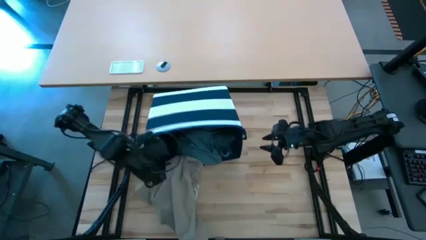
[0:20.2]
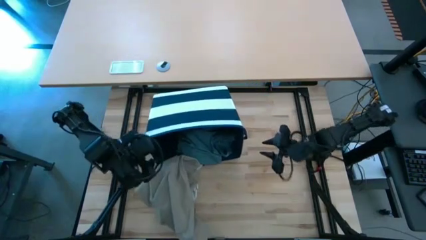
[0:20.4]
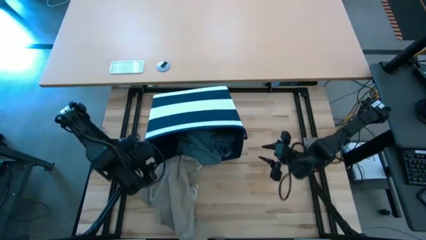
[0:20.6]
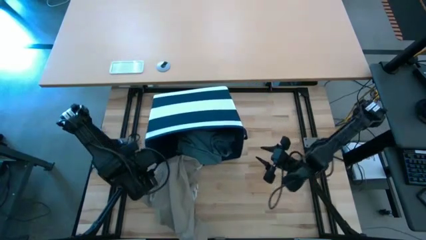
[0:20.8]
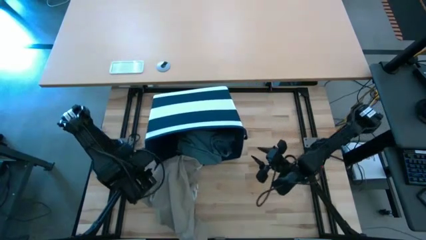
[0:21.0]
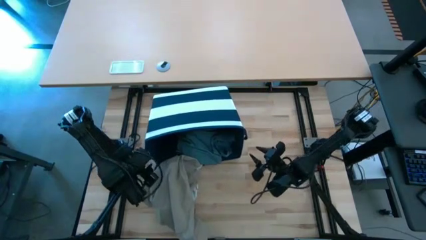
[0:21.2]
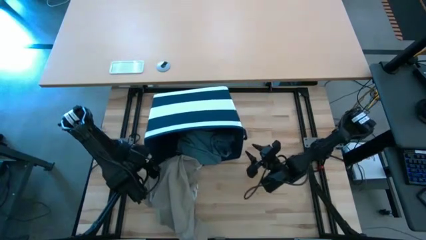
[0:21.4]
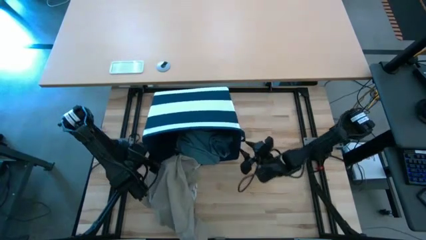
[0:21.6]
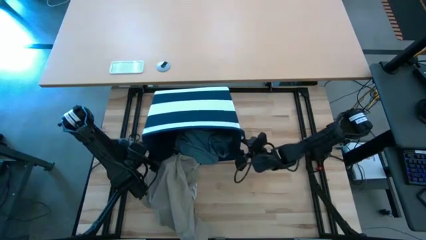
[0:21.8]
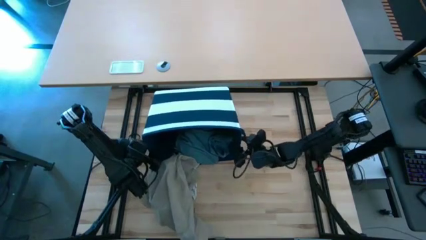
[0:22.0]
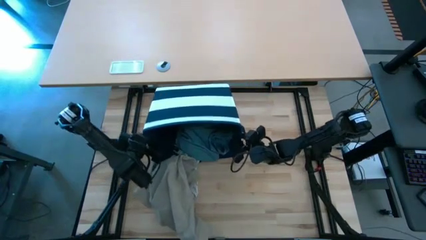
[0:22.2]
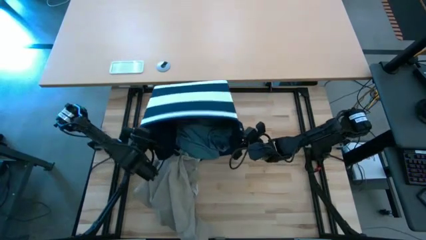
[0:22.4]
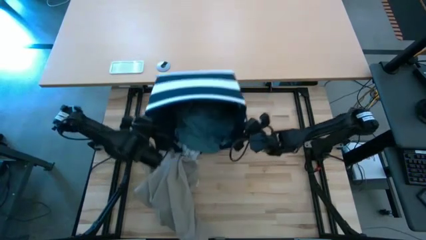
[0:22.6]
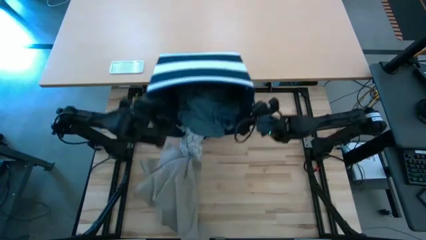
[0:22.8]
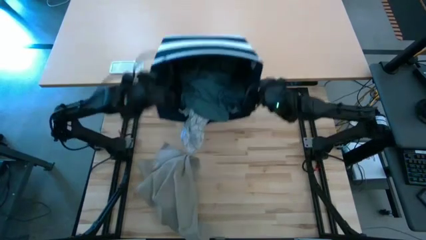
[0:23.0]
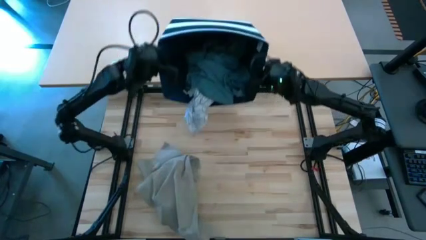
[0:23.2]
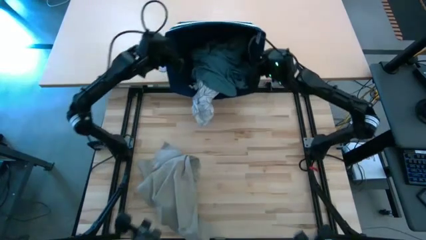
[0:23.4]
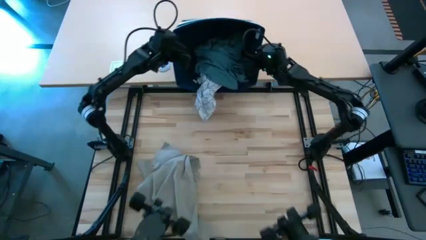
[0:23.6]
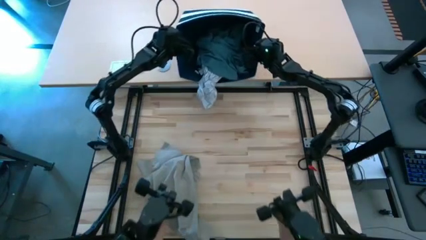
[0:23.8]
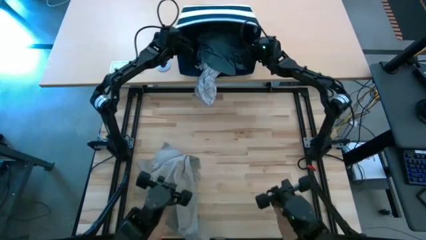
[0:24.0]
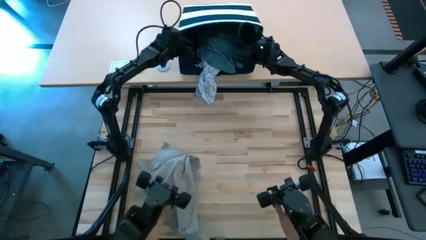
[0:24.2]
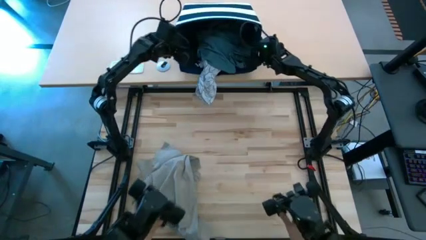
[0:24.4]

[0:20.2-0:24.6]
Task: Fold Laundry from Bin
Adjust the blue laundry basket

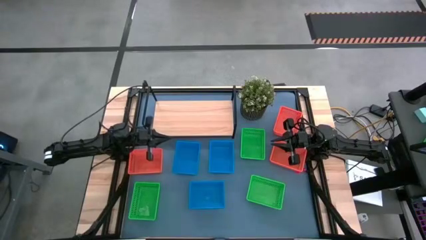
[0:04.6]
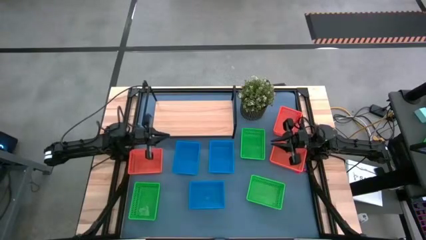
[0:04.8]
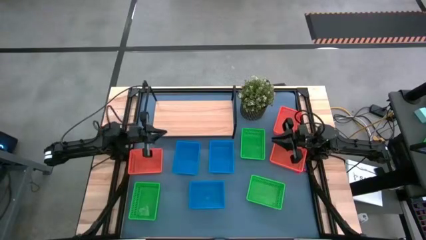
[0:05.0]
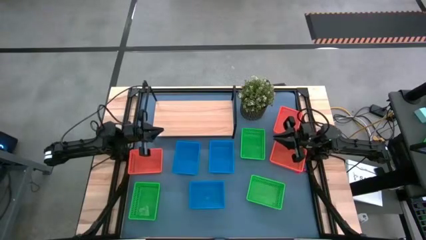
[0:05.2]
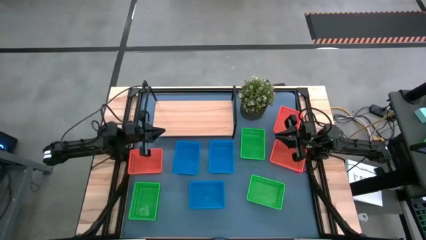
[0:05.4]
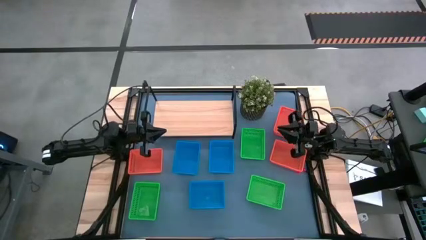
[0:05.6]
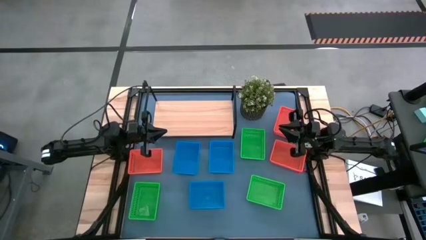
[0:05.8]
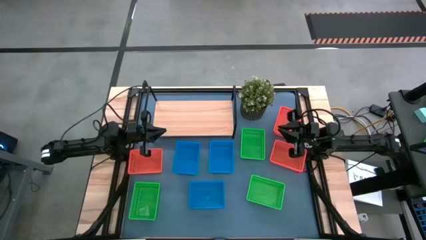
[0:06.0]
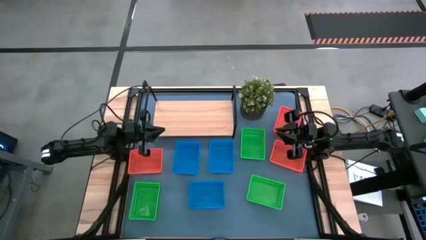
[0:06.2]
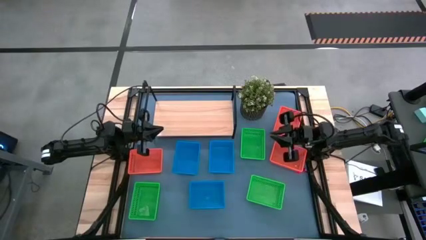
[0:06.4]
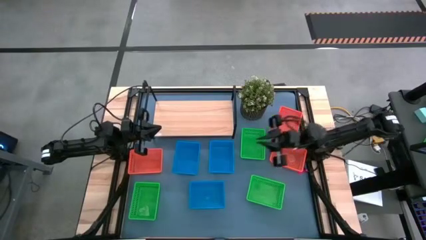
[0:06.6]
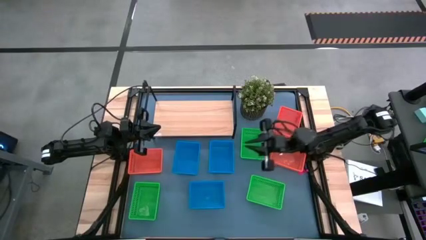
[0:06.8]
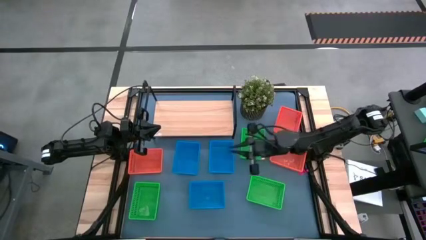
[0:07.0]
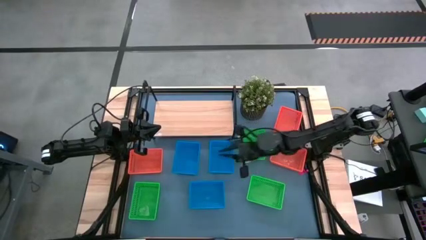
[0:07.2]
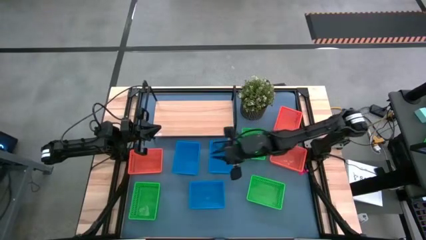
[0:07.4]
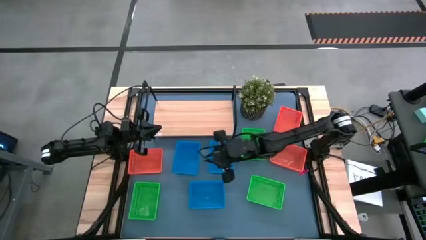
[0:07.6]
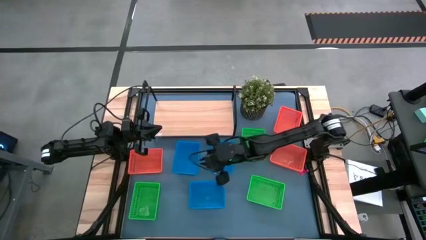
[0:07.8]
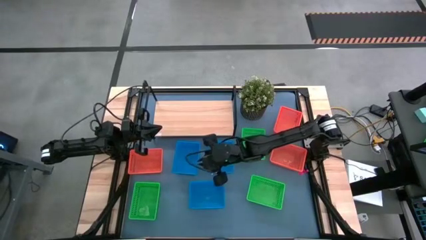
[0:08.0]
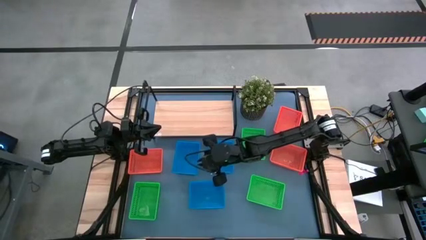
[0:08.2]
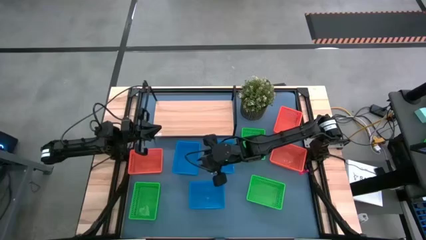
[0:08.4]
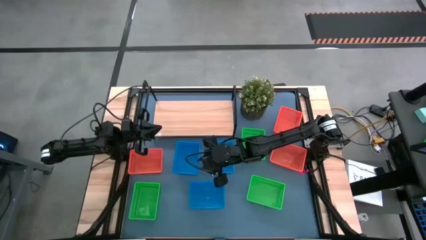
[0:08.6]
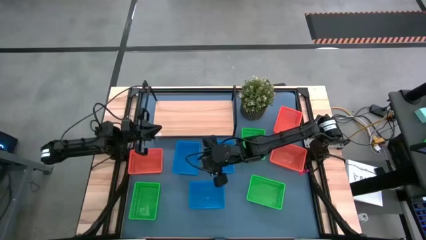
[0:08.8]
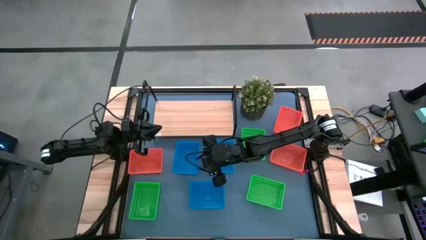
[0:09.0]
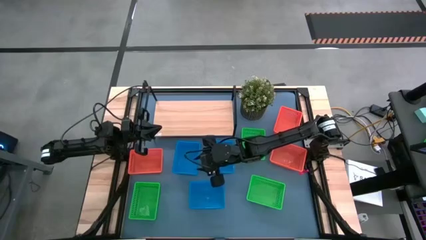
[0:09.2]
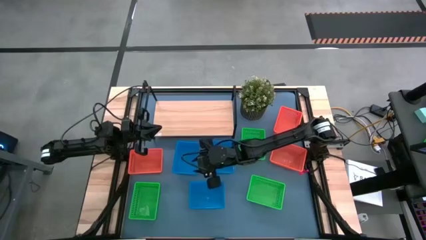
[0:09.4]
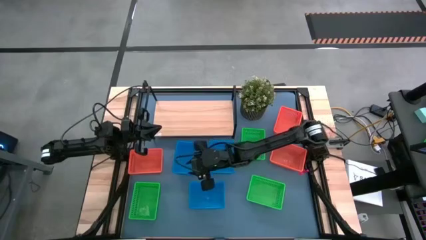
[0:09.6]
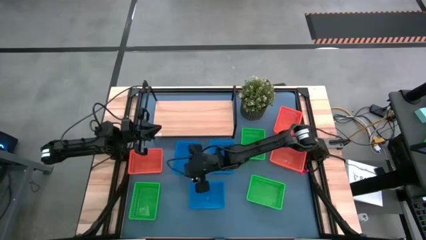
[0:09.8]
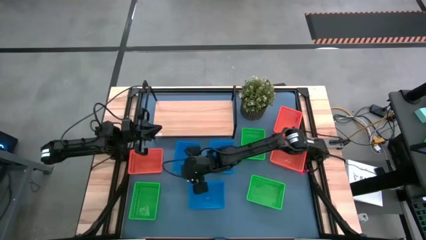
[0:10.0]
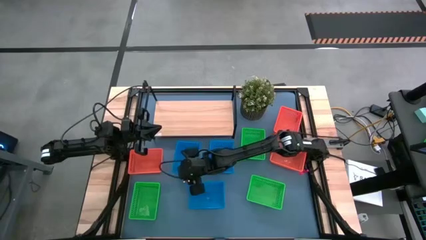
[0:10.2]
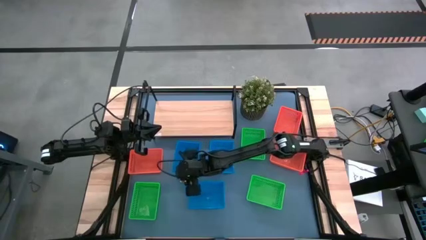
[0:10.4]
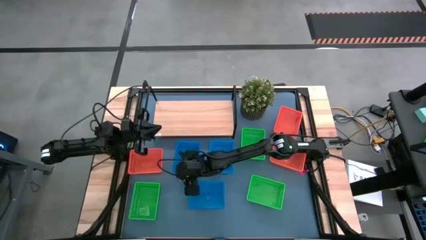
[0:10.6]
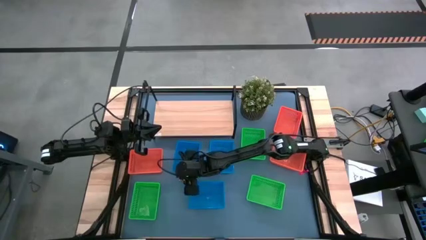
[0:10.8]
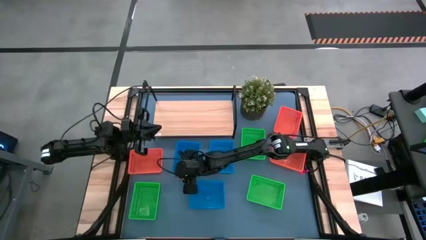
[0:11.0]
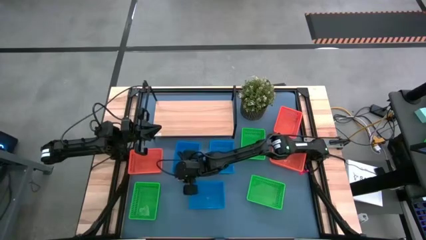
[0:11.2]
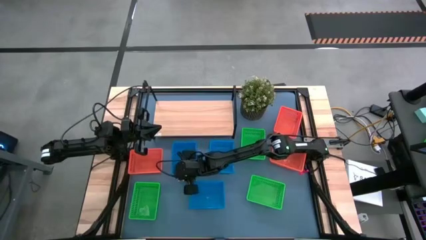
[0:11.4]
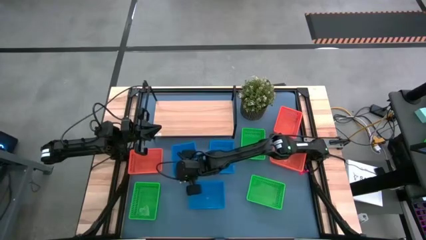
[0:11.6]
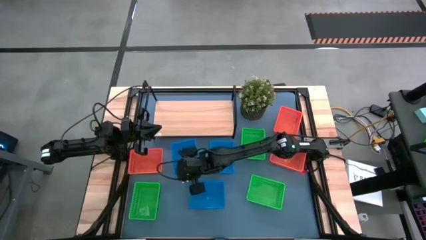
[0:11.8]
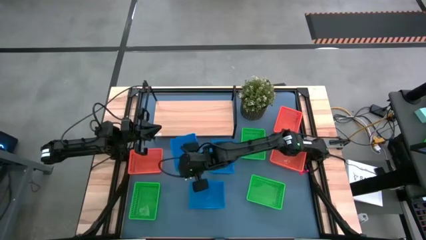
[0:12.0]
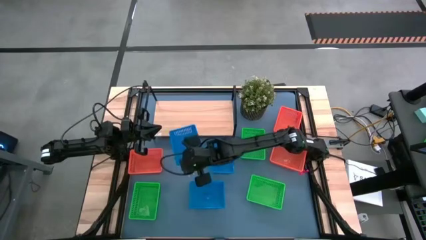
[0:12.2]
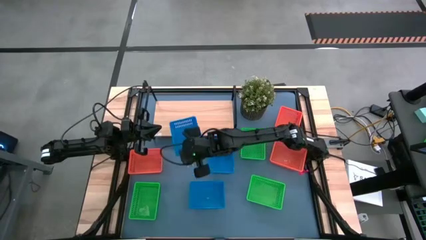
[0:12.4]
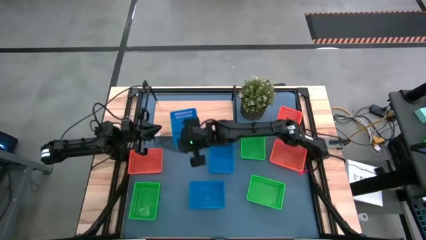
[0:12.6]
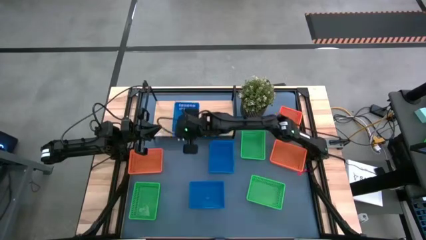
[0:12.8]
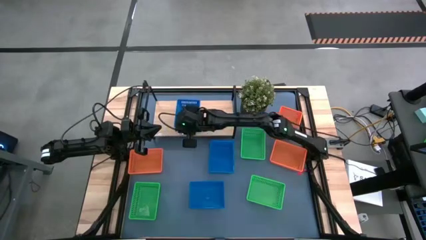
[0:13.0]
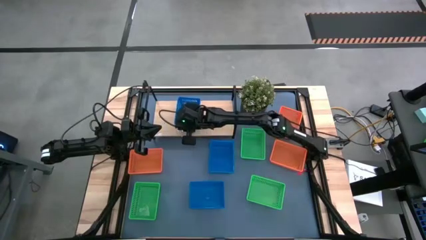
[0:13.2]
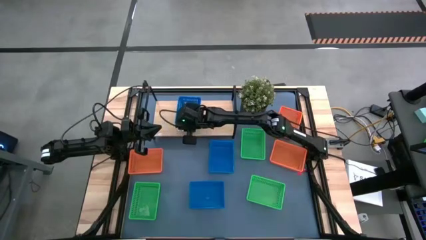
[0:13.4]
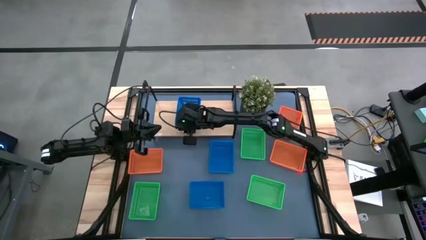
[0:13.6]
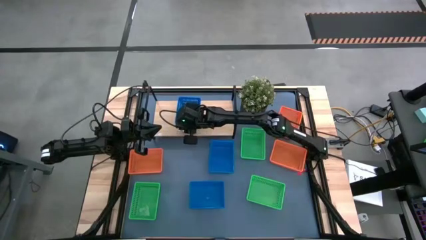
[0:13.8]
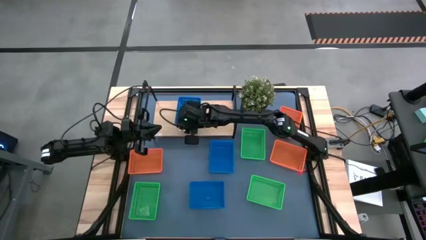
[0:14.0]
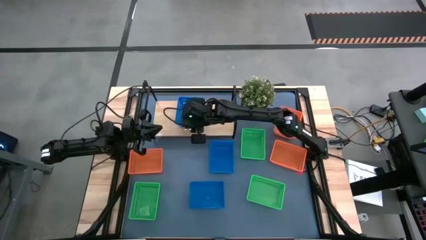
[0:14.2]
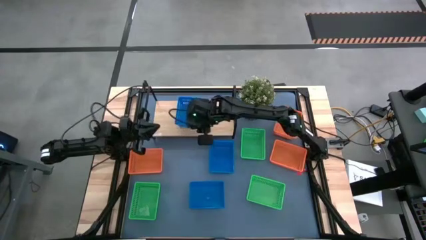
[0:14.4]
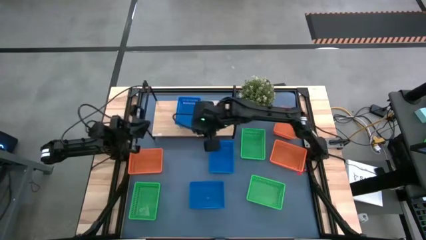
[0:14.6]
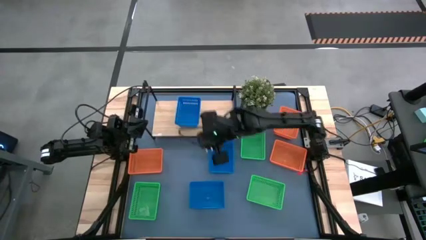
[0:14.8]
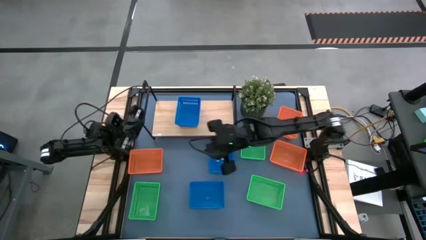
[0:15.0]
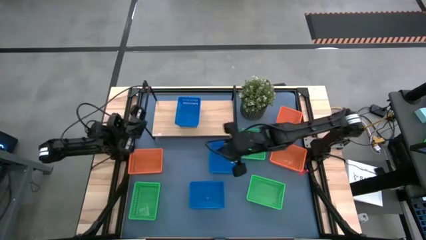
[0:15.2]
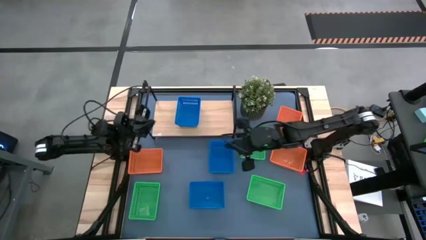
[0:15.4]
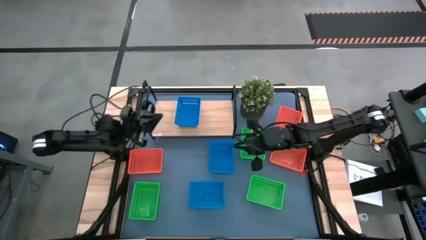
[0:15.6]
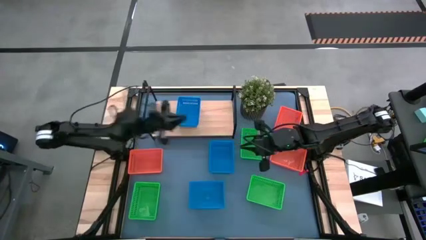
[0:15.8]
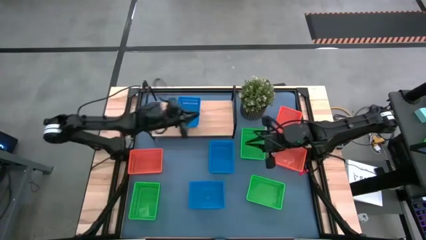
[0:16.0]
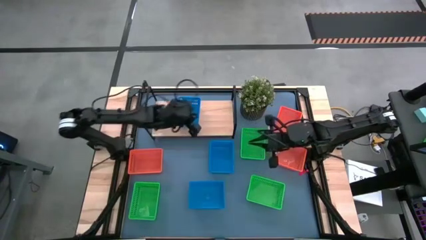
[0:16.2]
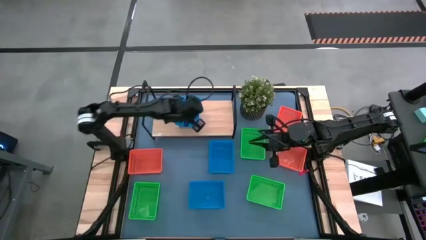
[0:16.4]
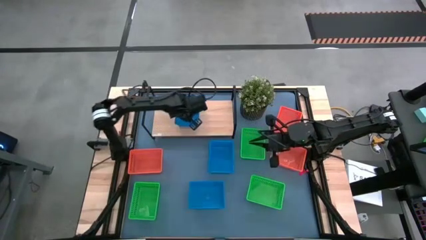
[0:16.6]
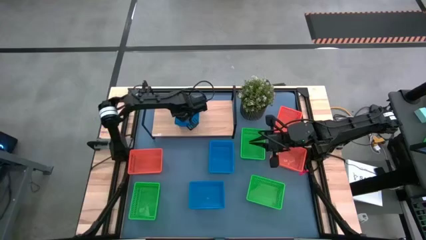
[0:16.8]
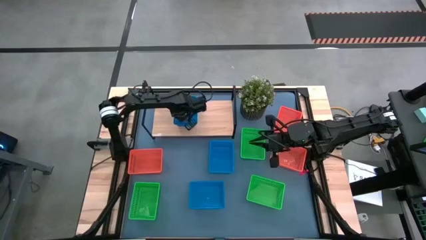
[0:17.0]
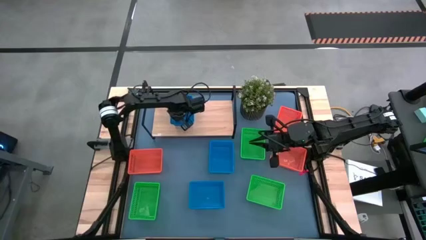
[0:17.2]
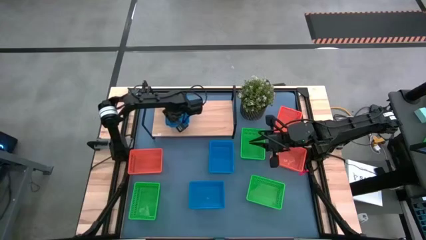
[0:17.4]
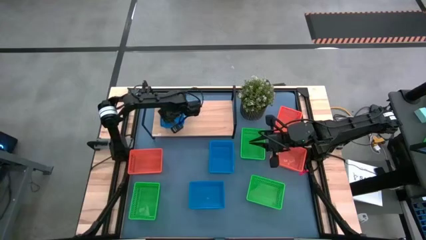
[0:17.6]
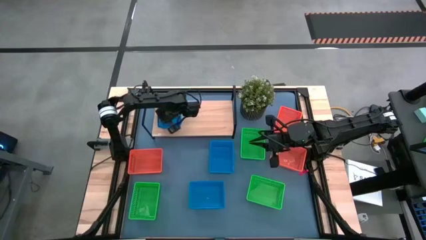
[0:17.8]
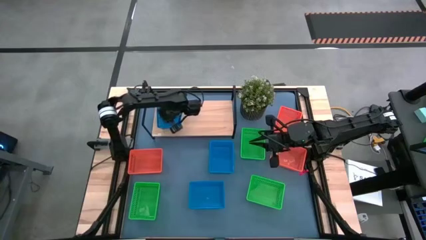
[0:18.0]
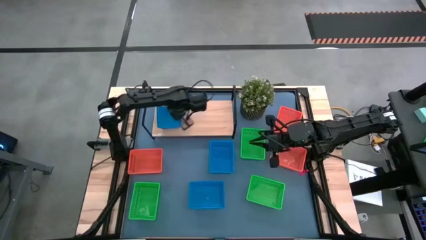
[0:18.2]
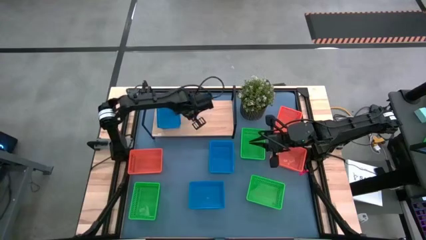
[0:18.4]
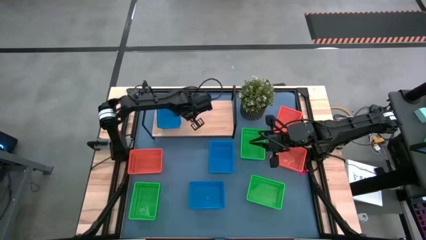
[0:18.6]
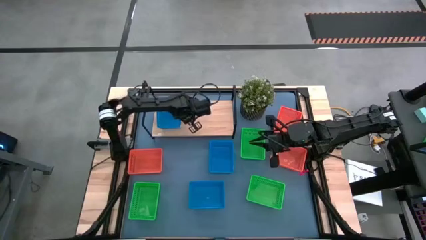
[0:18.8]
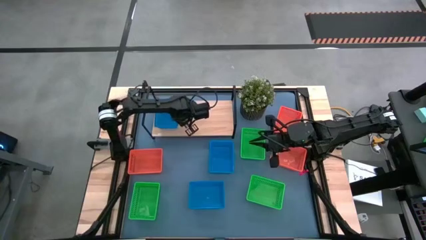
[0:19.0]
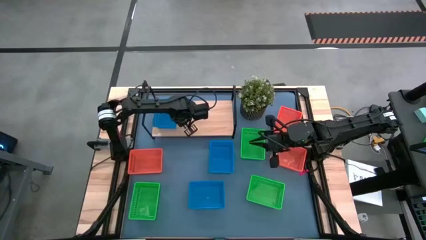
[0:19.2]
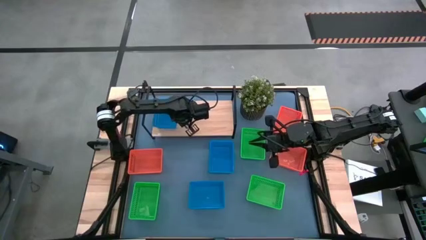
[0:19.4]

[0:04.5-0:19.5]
Task: Stack baskets on shelf by color
Put the top left blue bin on the shelf
